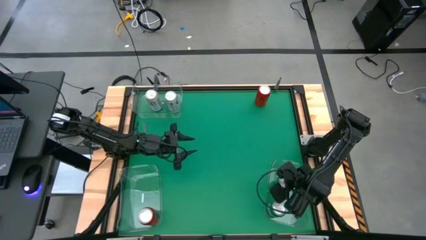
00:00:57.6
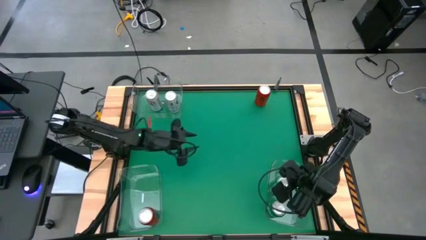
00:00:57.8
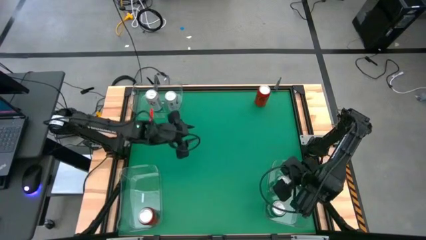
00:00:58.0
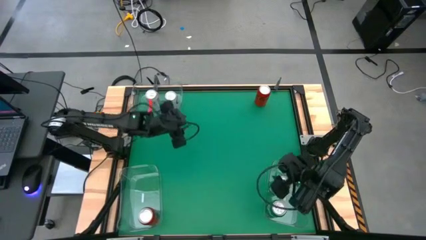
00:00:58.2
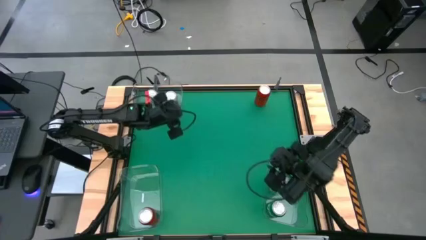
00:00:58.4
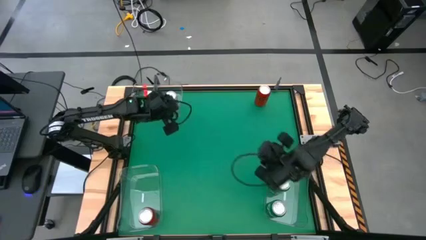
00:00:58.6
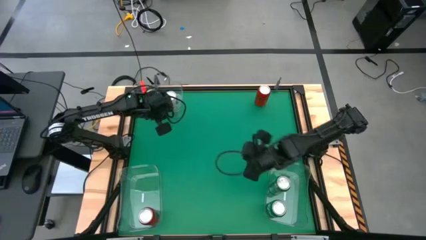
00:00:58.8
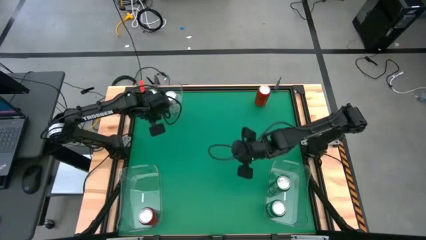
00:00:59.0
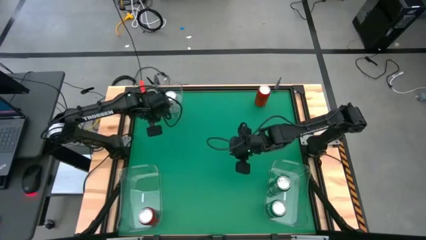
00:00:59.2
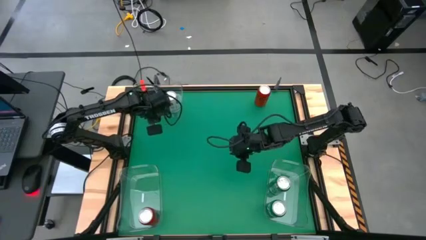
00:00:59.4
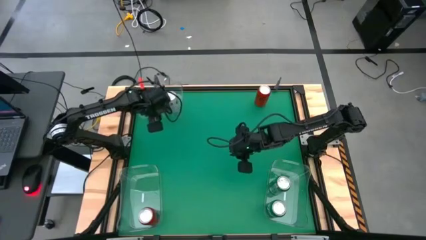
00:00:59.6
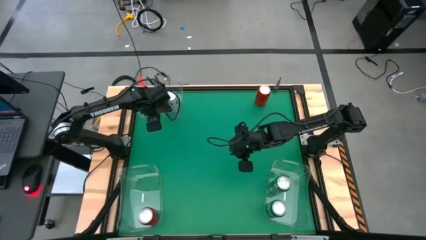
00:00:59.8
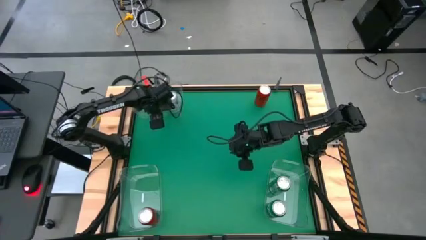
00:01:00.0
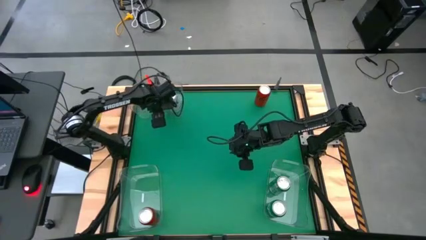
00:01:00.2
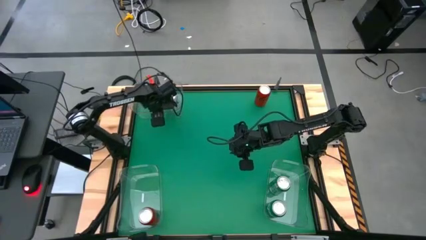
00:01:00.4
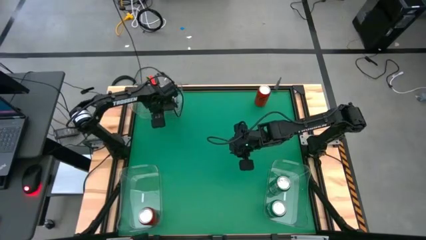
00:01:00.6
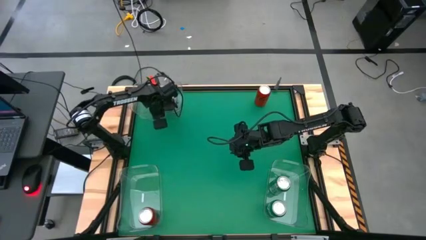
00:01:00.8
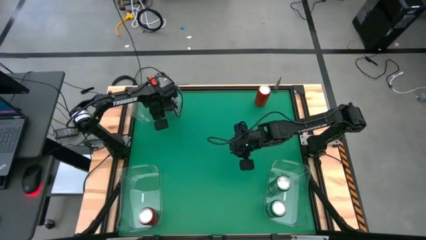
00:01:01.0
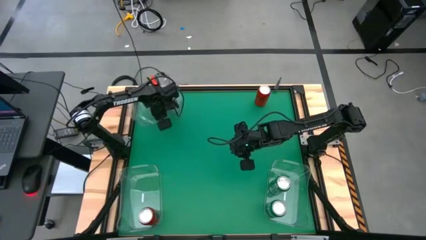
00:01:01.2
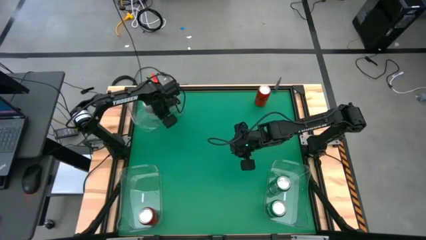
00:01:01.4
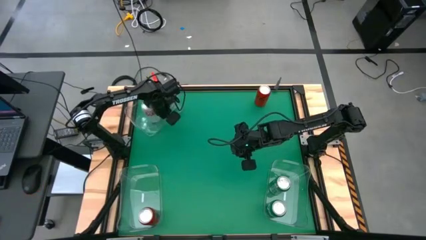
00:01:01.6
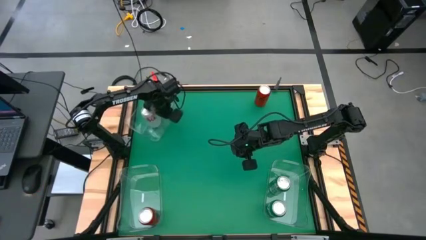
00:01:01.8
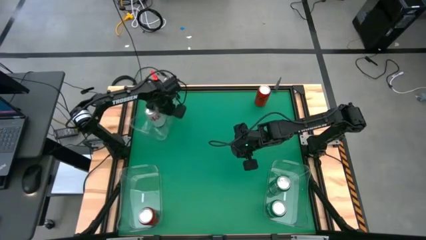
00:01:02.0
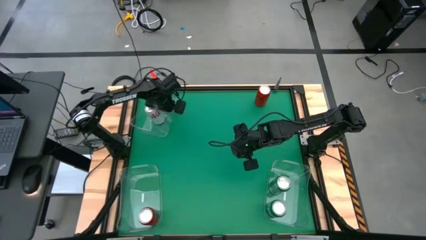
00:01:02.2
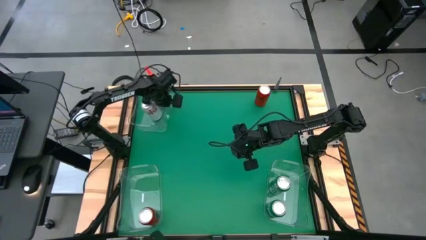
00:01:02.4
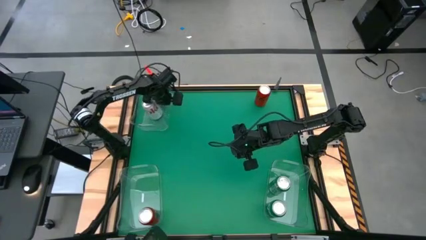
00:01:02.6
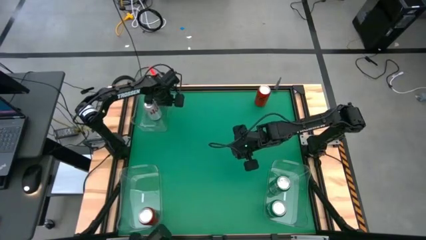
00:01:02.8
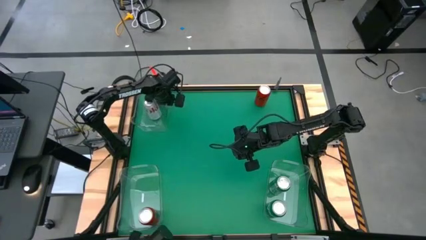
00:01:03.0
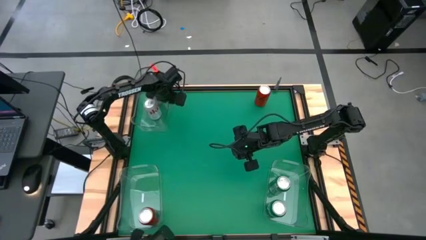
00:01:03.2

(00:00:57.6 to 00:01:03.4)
Task: Sort soda cans
Adjust the top transparent bin to the left corner

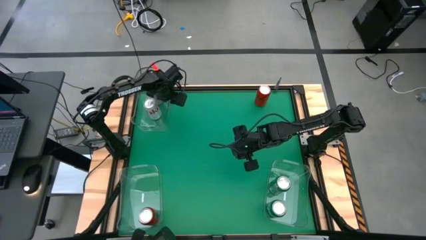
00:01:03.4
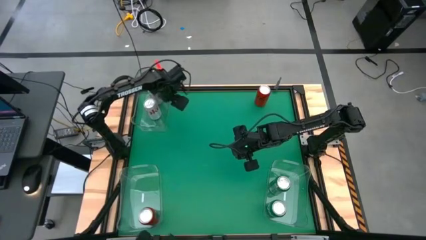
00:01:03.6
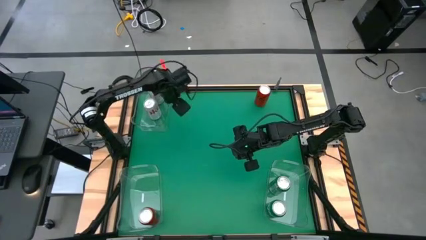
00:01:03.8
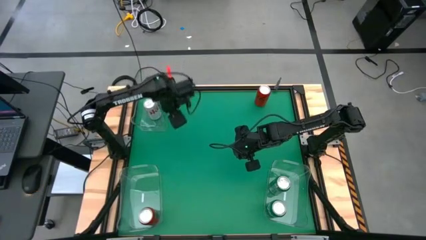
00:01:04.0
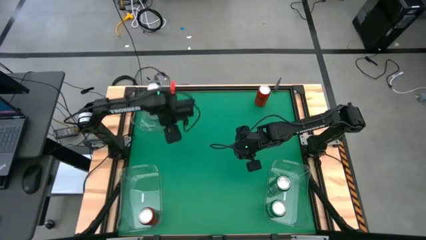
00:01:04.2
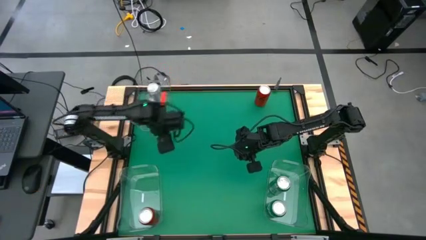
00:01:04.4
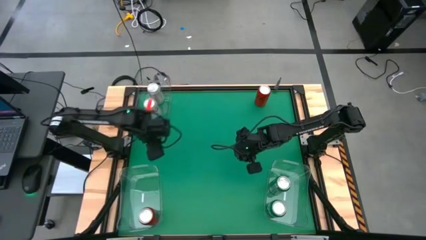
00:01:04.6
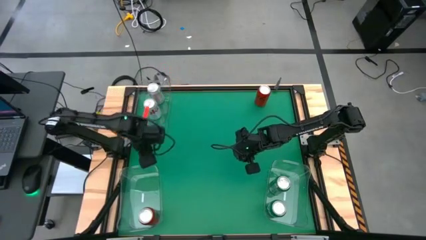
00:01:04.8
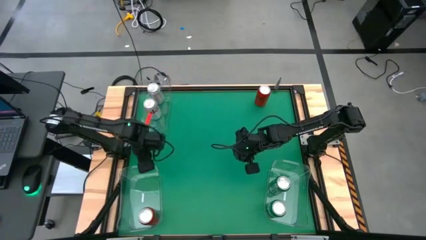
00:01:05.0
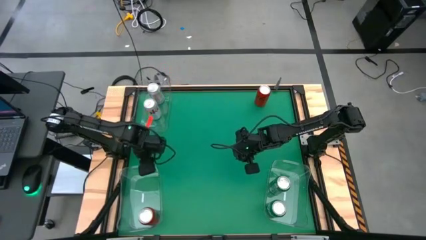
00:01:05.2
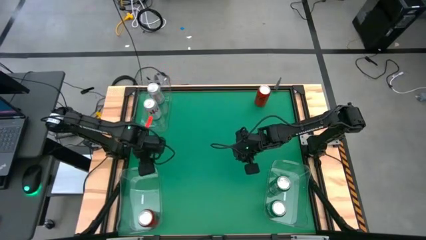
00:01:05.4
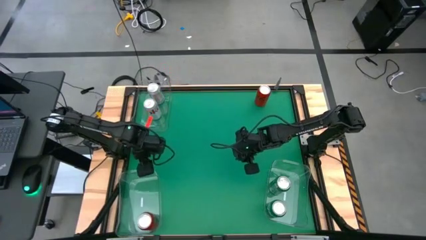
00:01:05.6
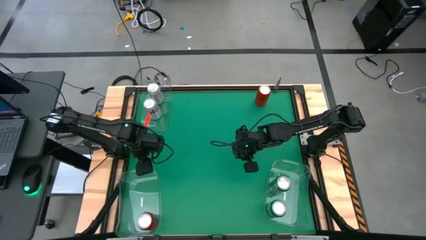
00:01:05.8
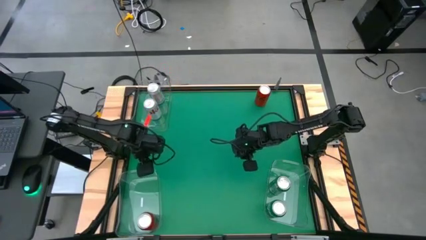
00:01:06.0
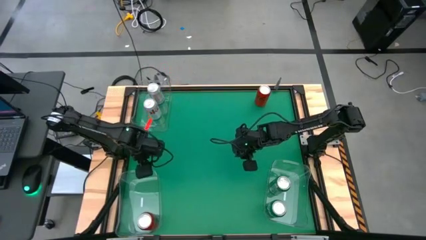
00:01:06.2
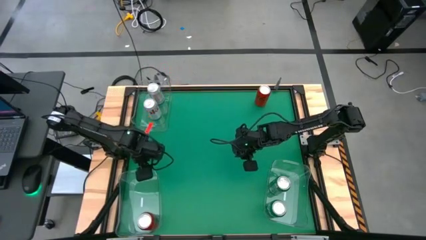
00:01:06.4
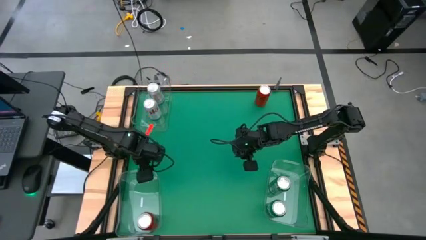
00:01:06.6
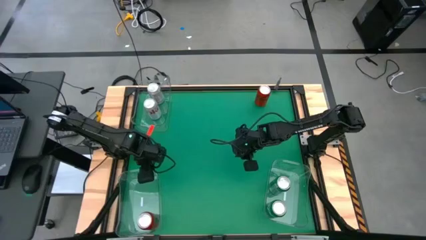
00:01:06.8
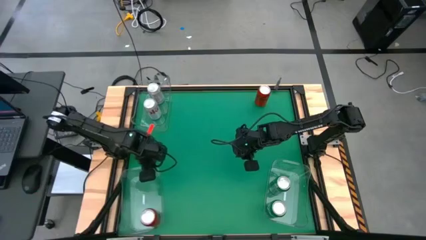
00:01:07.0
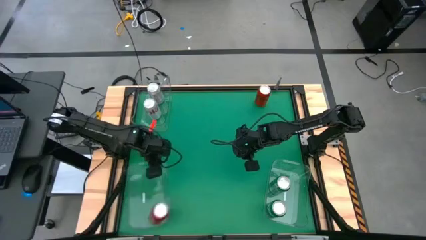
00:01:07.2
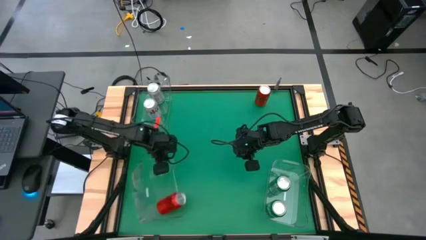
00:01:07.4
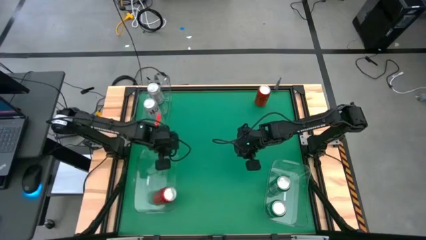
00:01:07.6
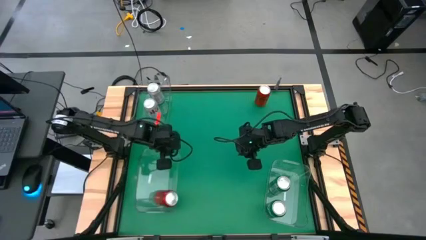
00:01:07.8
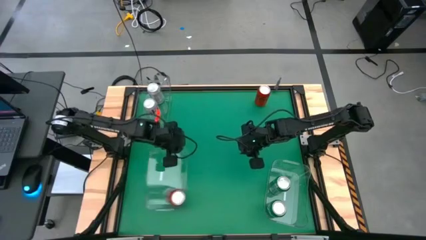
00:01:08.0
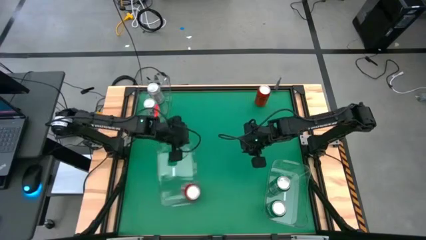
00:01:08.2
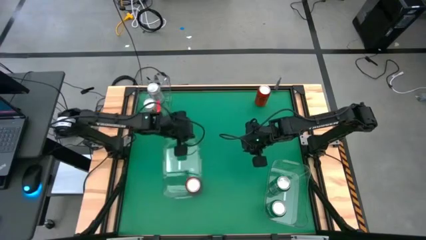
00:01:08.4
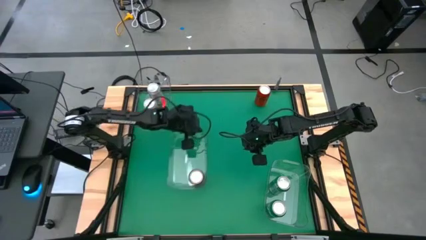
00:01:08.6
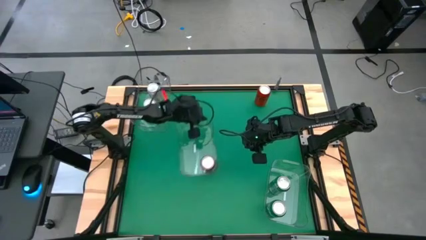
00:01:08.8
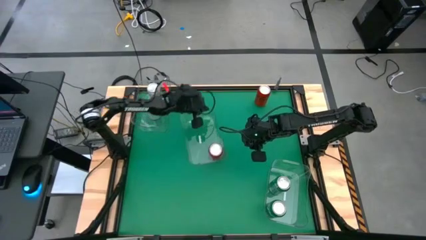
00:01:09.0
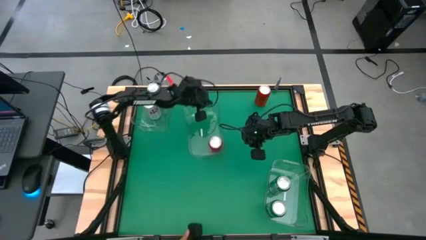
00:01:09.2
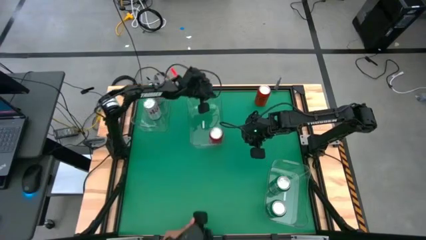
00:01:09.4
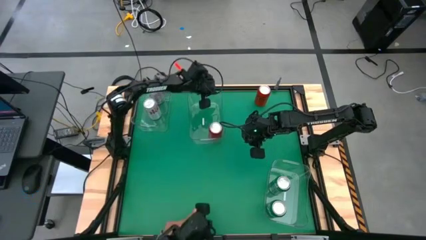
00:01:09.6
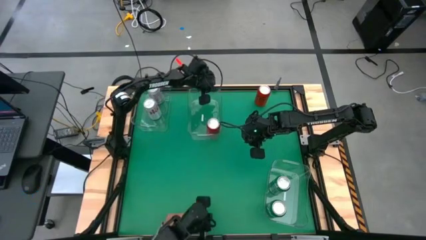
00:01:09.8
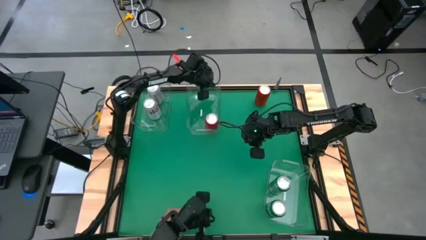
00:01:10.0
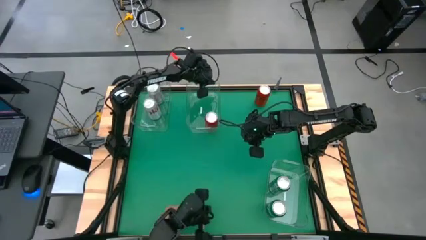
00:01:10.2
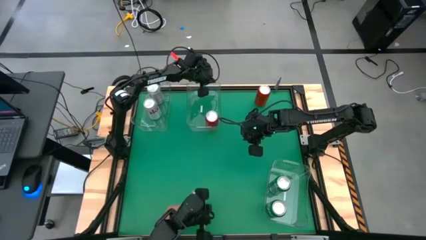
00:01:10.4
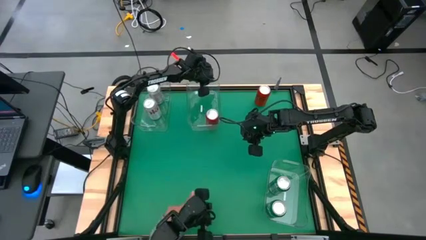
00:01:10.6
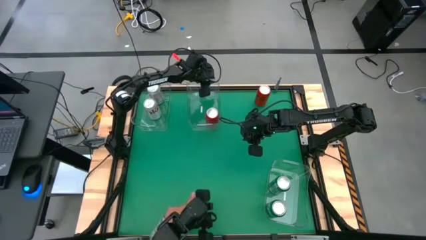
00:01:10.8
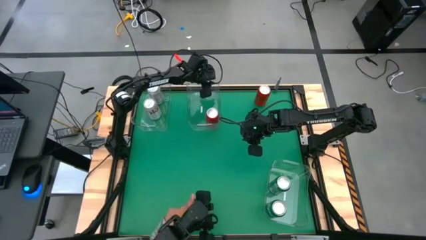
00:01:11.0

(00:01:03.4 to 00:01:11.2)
Move the bottom left transparent bin to the top center

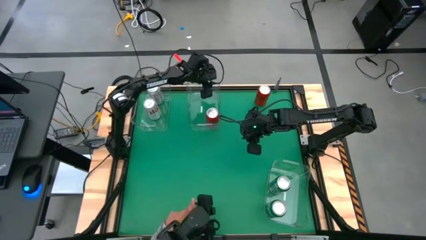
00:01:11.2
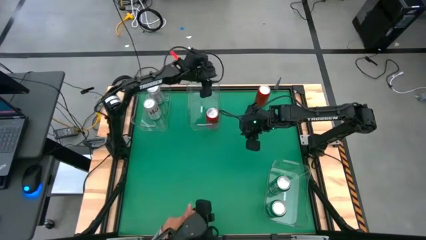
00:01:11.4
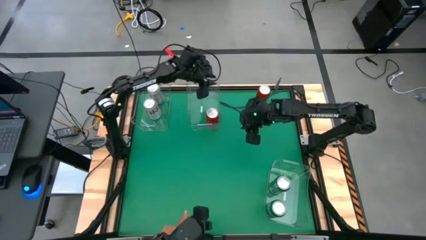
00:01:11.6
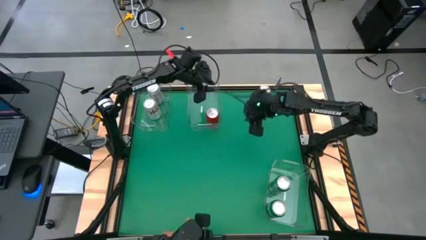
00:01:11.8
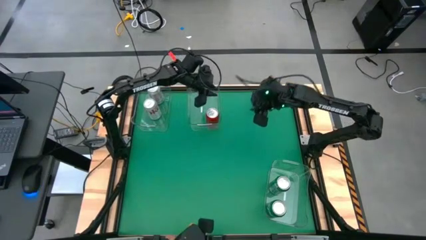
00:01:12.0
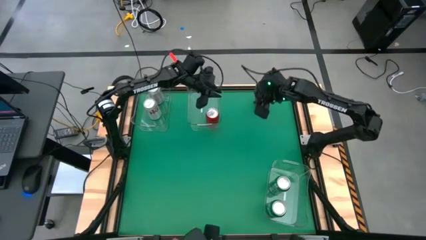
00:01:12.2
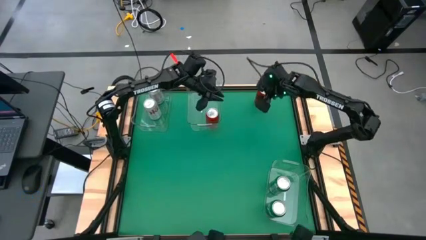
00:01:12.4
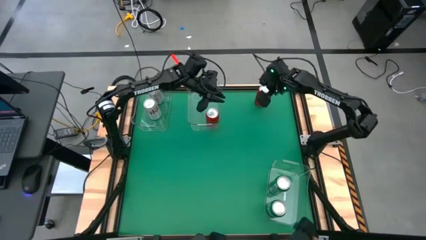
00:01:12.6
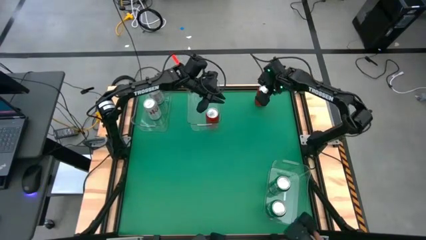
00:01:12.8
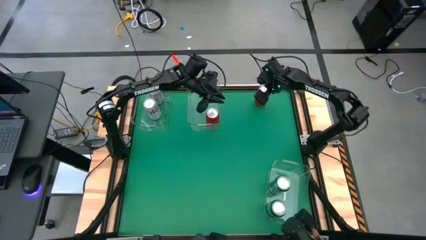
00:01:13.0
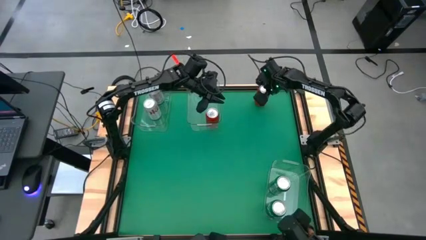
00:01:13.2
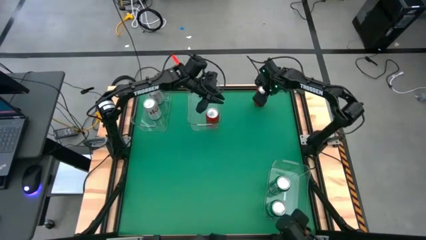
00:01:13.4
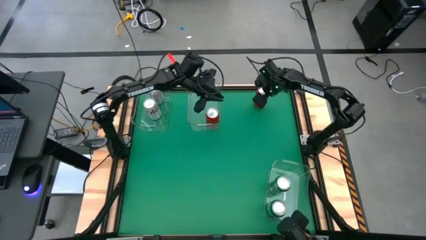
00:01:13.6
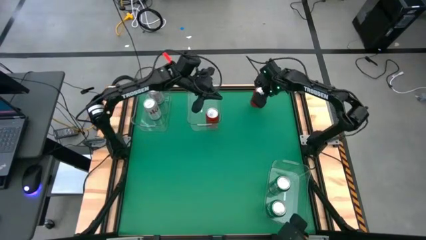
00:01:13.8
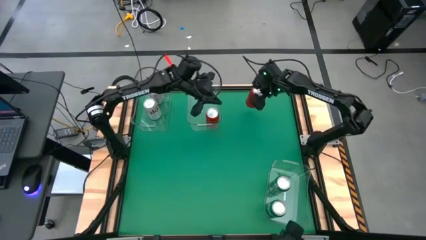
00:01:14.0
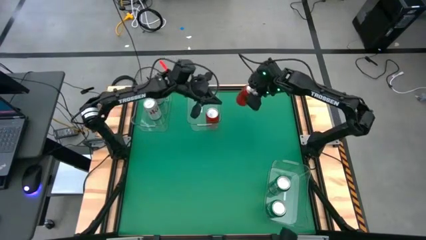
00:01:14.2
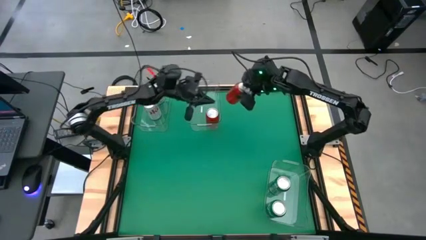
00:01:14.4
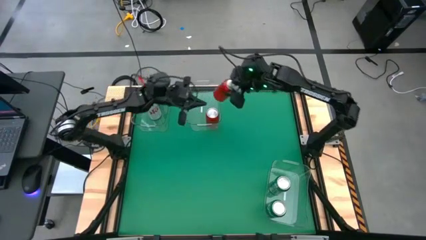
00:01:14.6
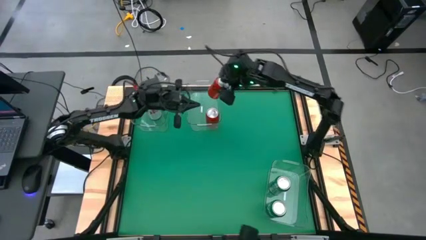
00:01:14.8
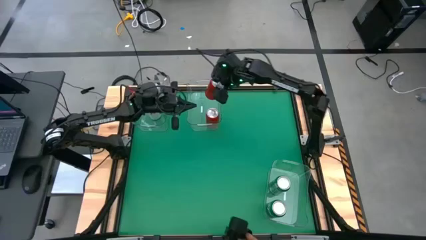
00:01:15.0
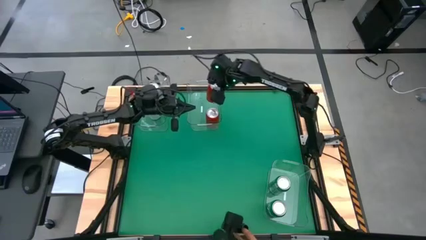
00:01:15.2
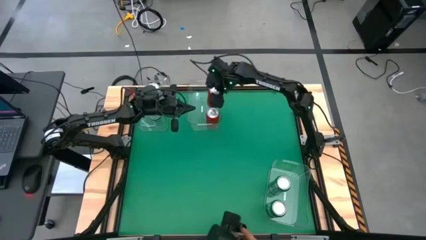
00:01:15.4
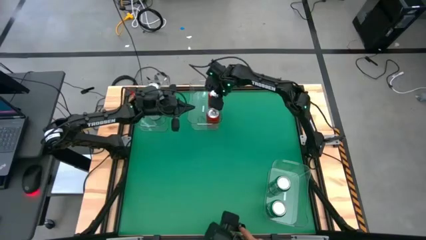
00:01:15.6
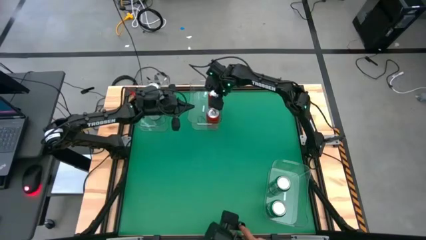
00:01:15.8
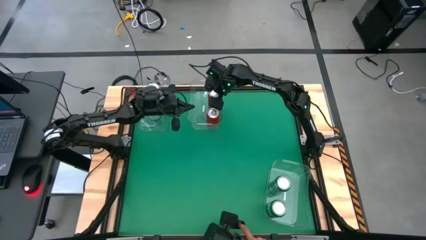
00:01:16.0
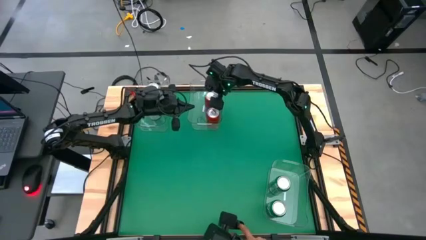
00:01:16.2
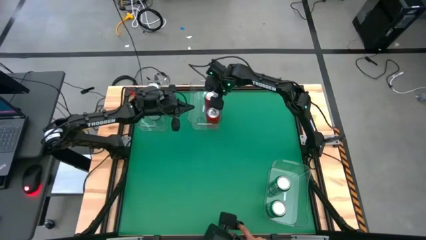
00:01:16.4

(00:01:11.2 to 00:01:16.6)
Put the red-black soda can into the top center transparent bin
